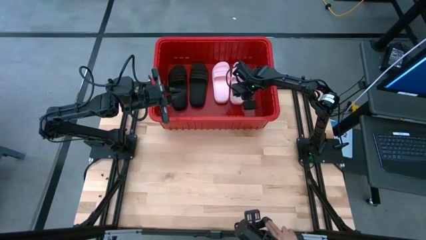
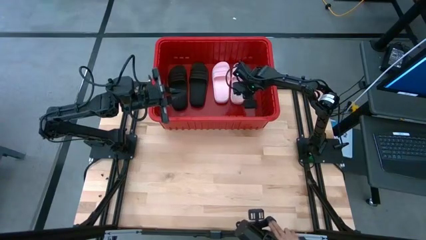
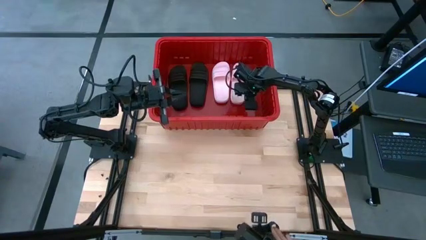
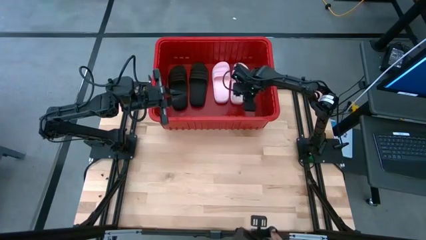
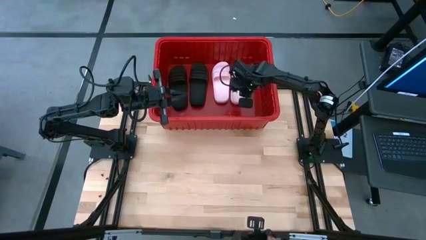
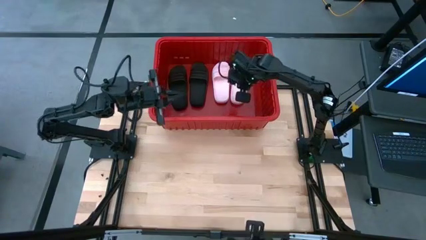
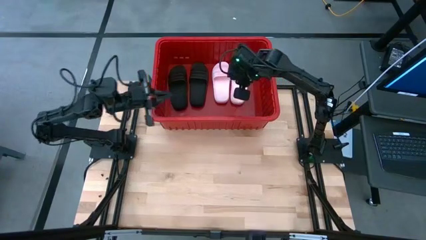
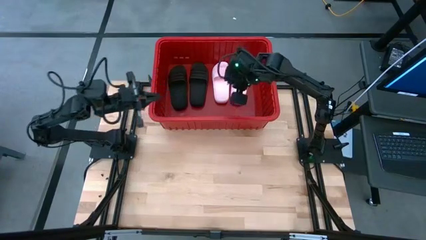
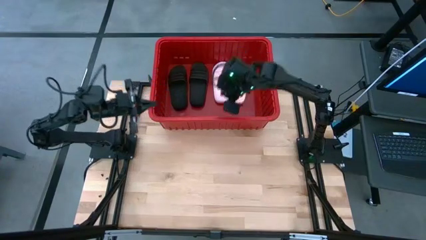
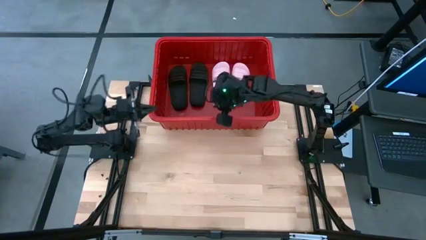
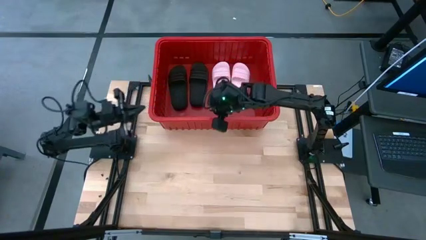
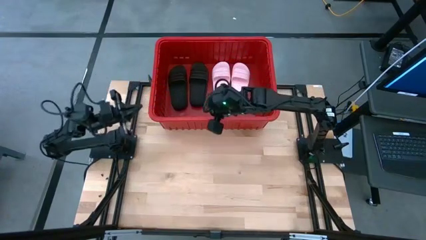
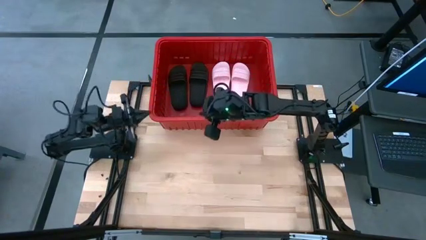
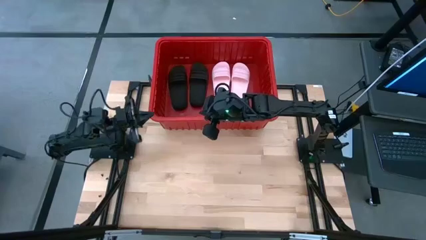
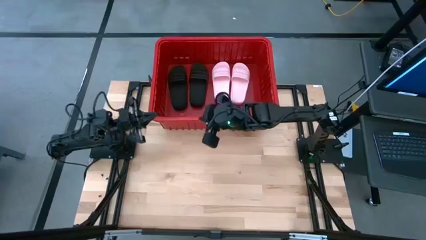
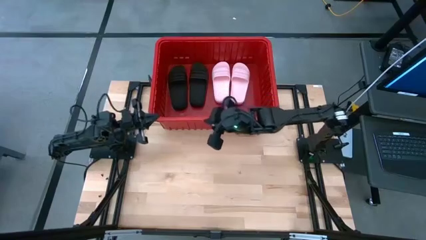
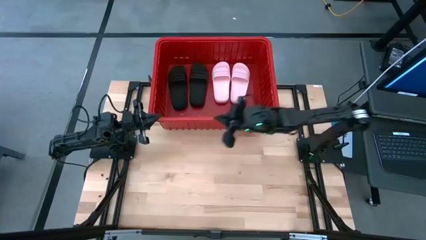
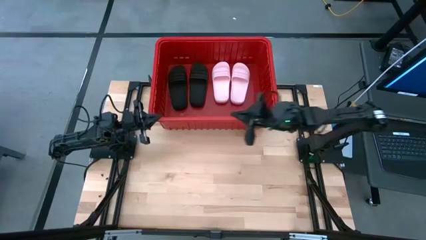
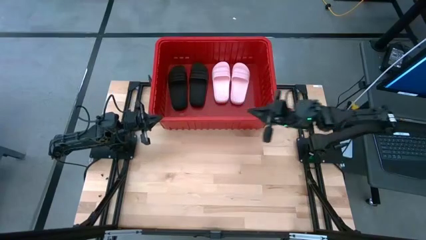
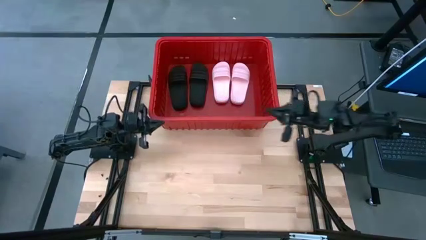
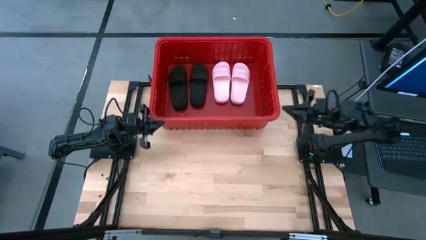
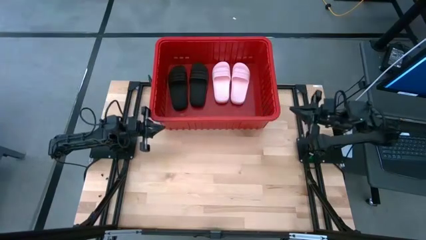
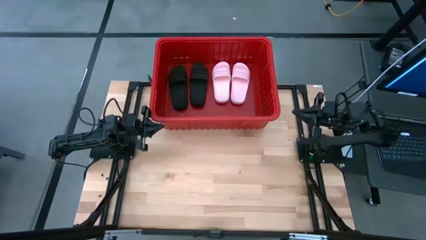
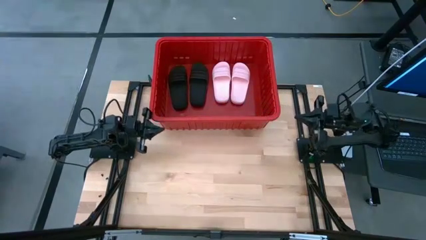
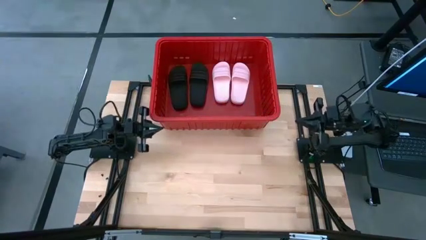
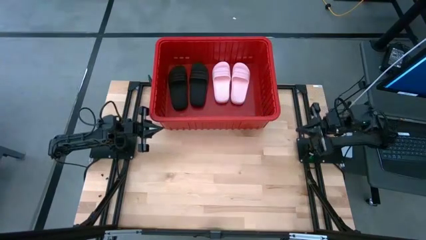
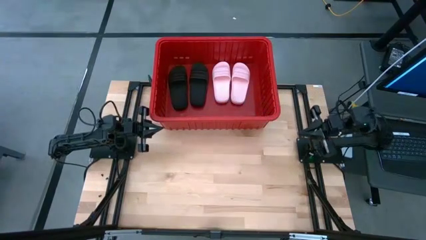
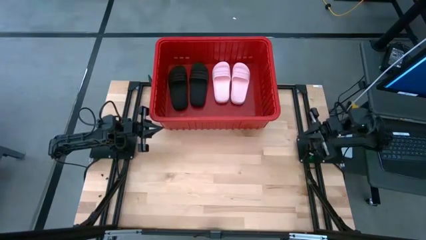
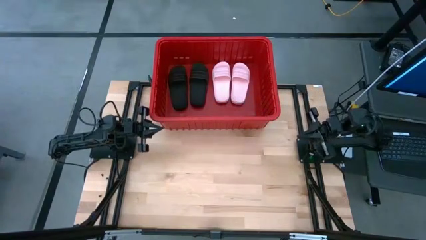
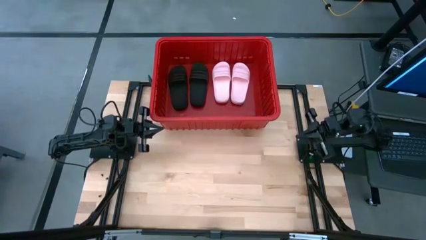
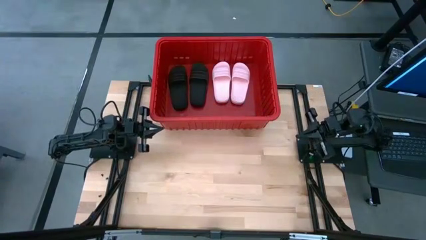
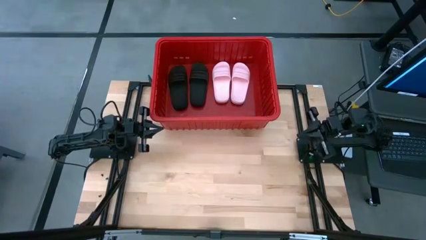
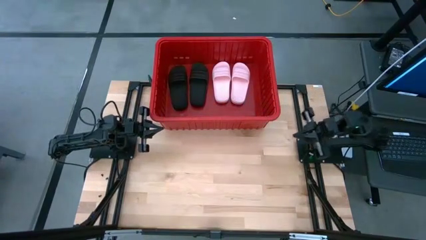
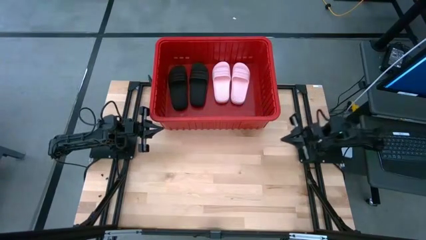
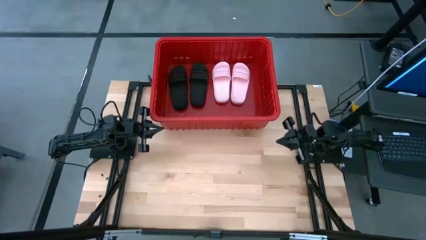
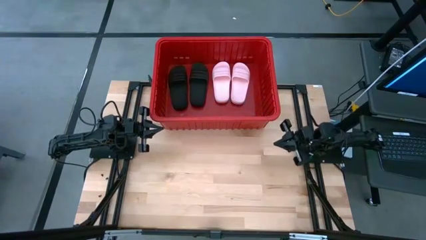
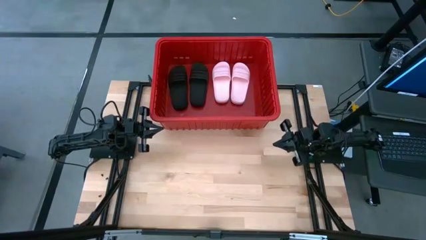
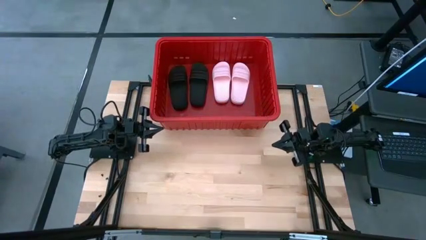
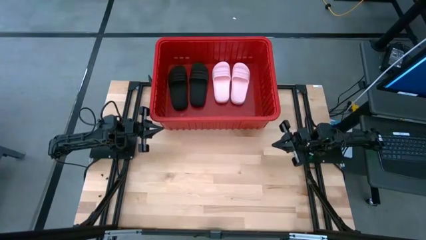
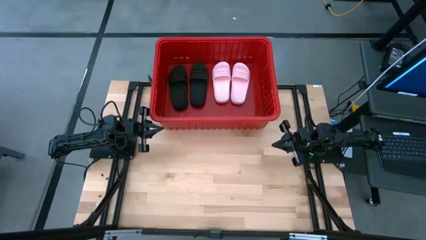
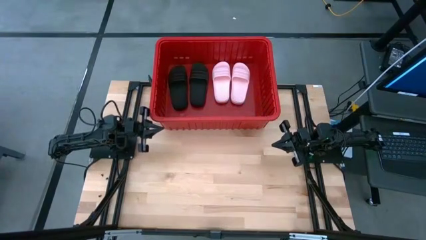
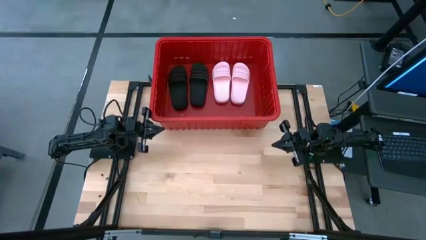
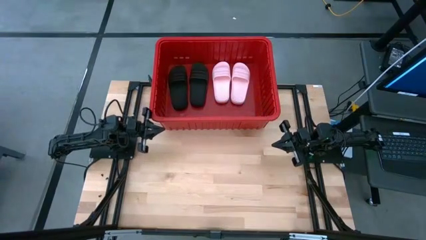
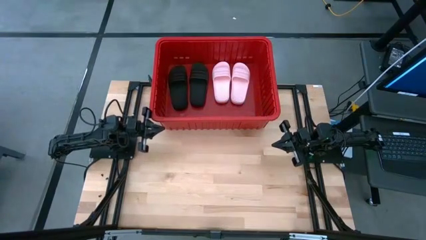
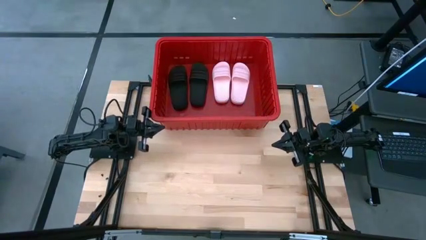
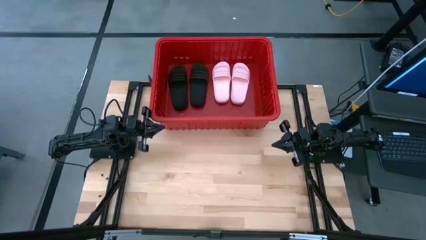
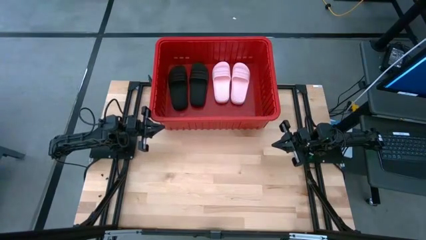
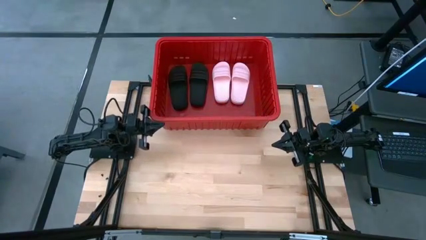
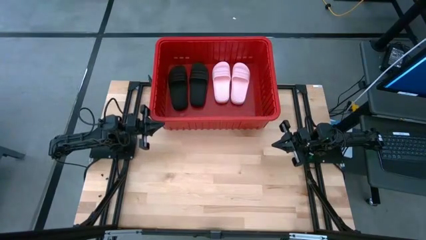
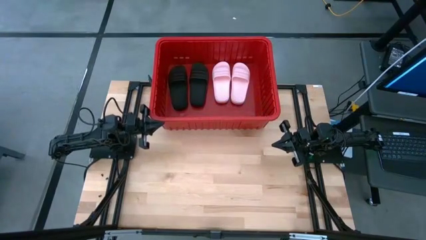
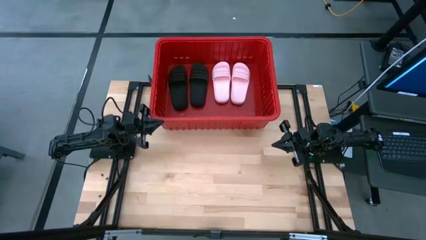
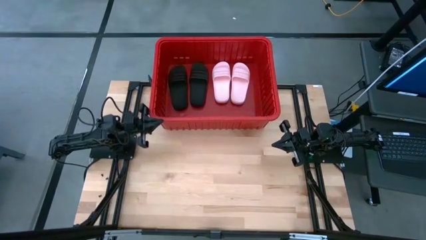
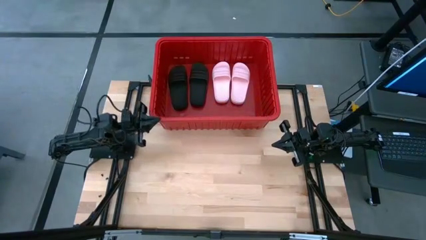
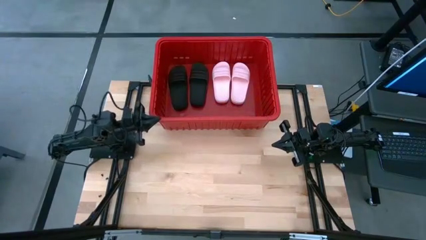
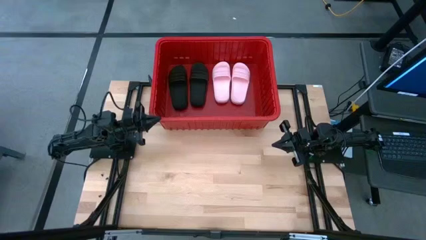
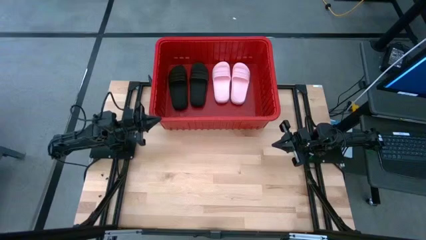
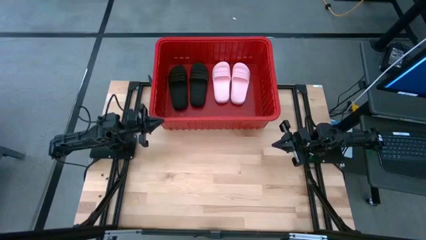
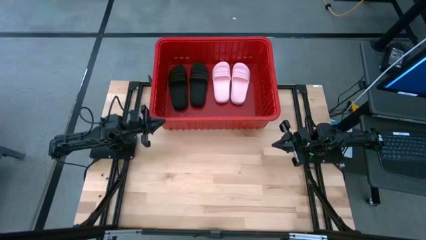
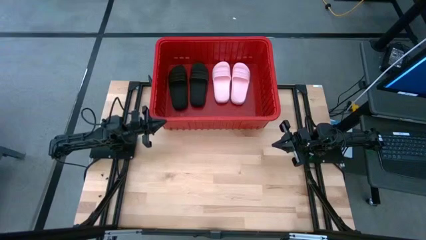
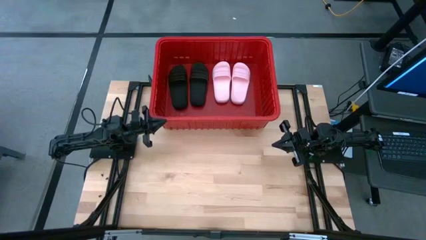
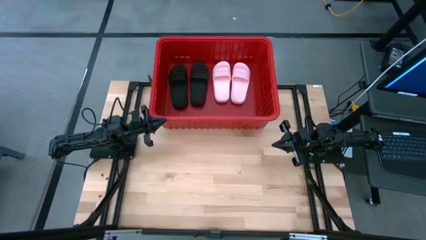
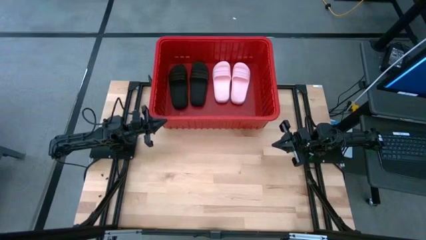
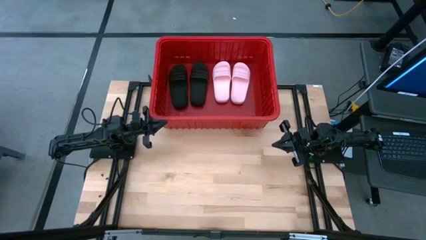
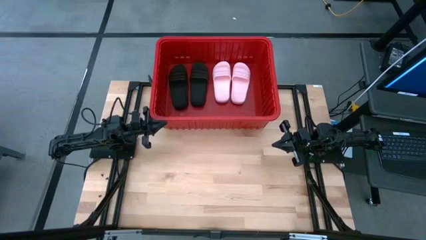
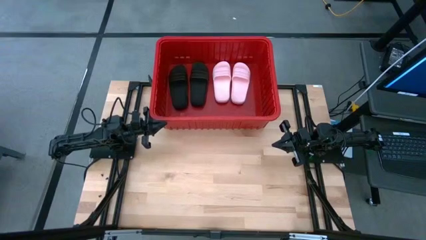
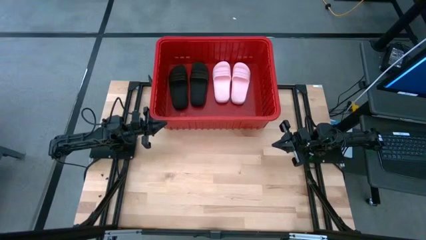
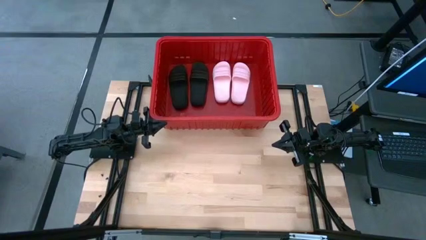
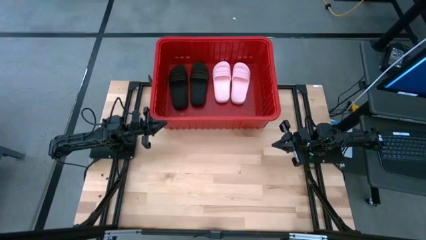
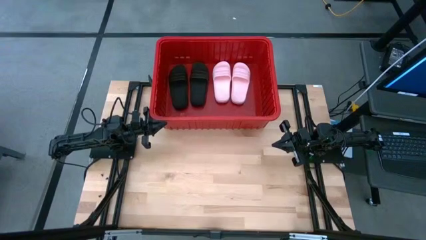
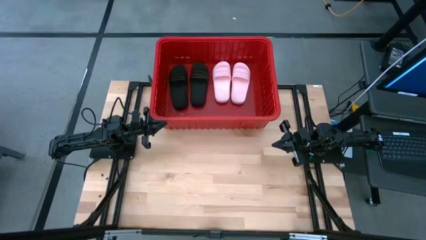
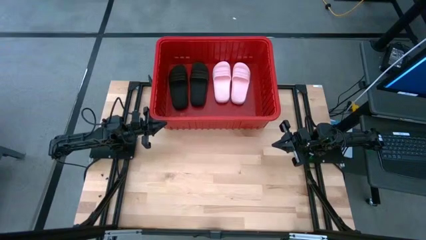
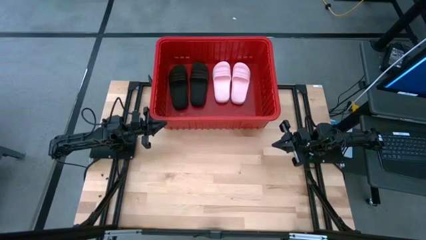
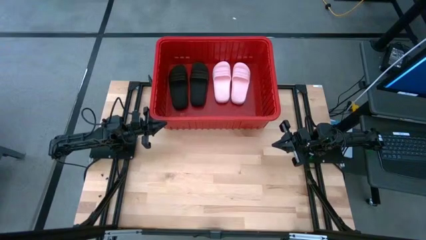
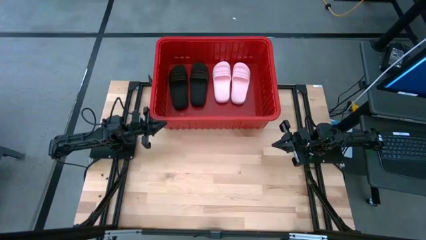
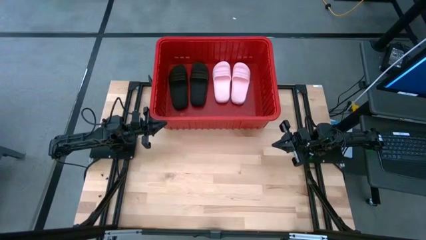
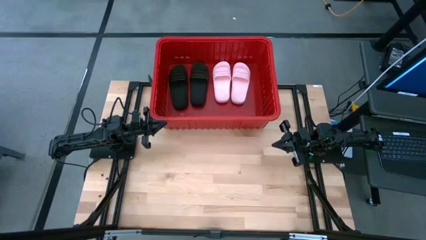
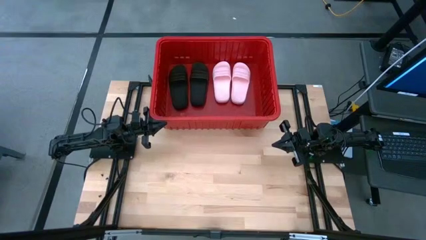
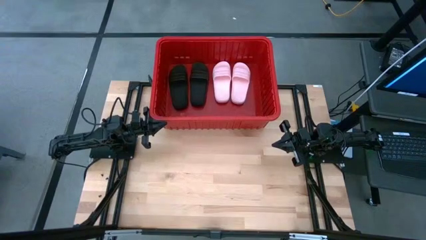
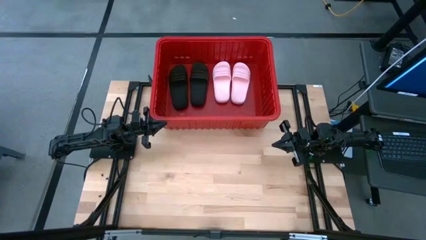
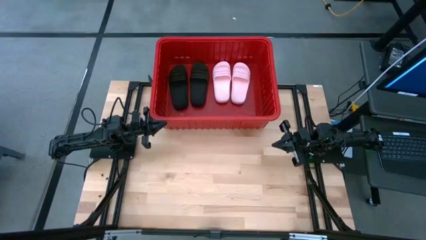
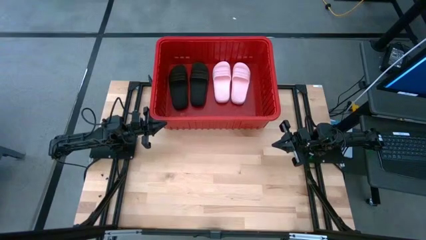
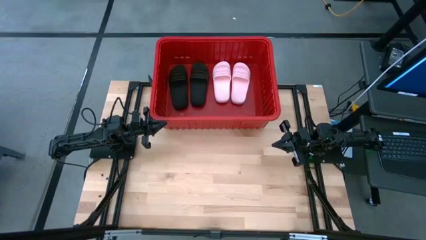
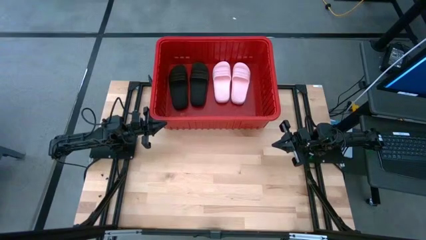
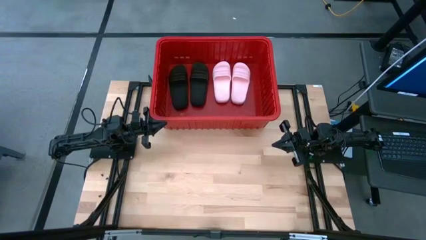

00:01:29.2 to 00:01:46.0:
Task: Pick and place slides into bin
Return to Home Position
